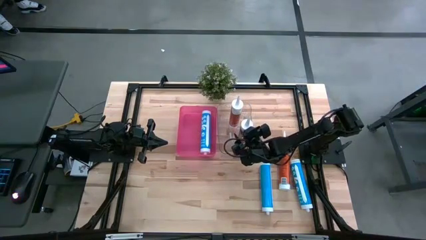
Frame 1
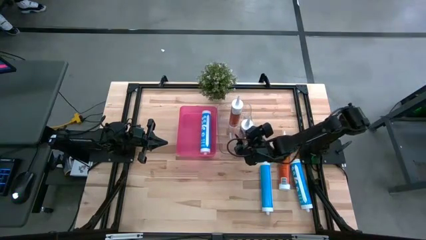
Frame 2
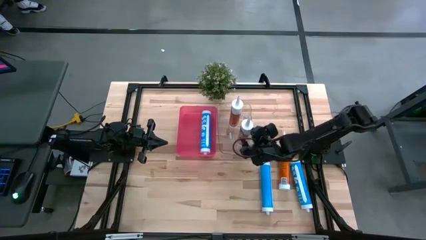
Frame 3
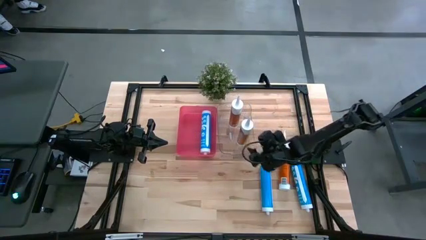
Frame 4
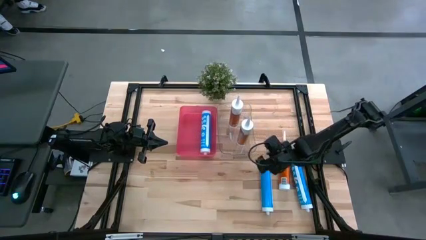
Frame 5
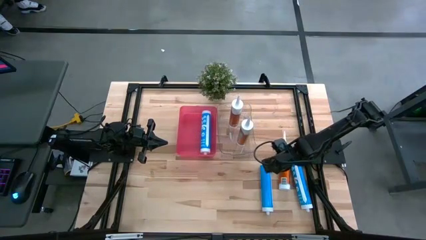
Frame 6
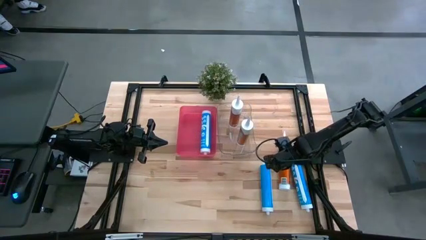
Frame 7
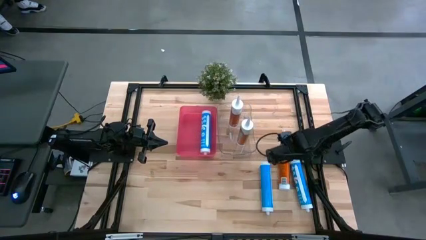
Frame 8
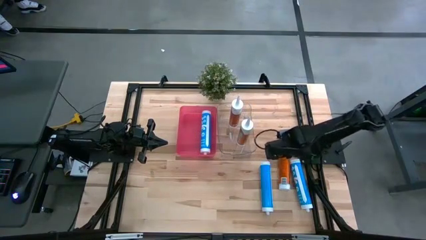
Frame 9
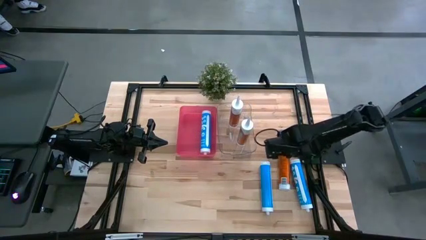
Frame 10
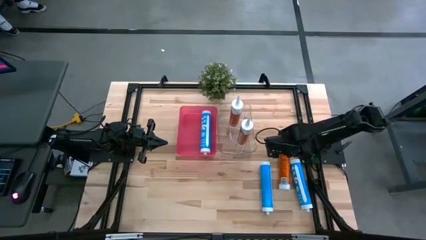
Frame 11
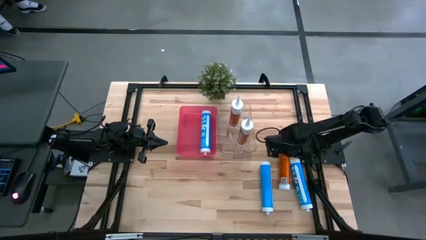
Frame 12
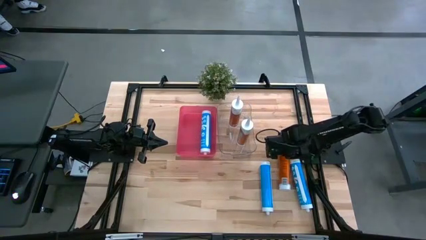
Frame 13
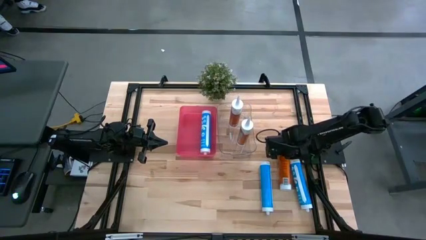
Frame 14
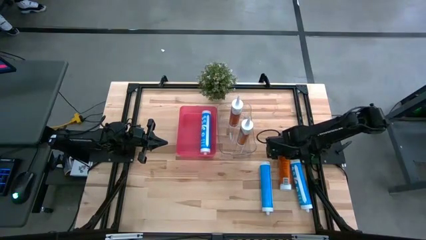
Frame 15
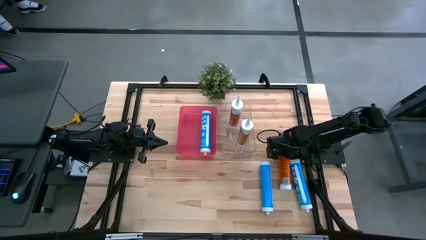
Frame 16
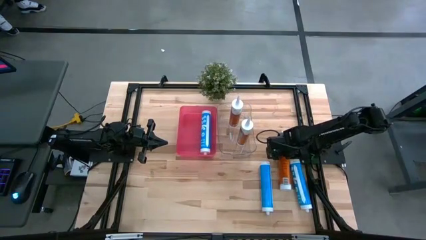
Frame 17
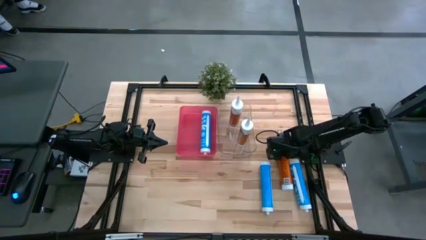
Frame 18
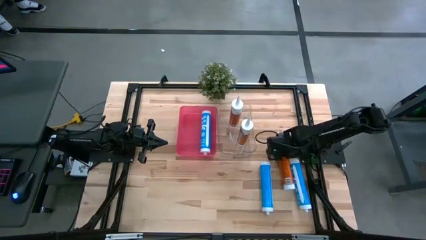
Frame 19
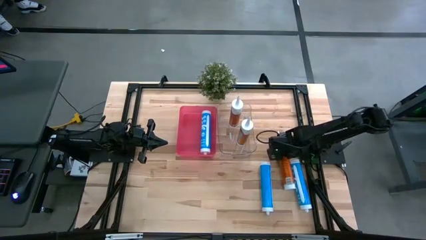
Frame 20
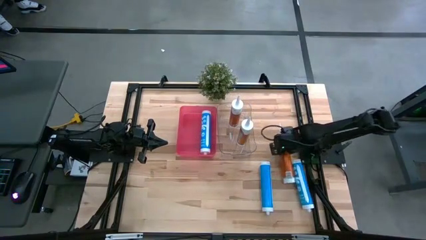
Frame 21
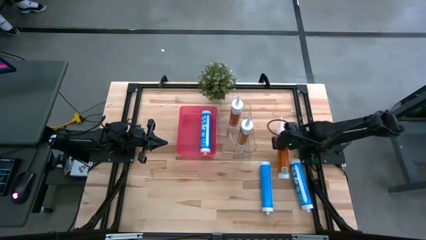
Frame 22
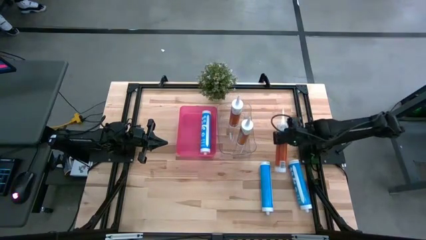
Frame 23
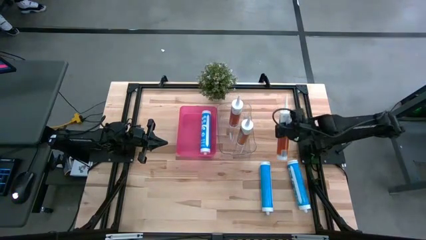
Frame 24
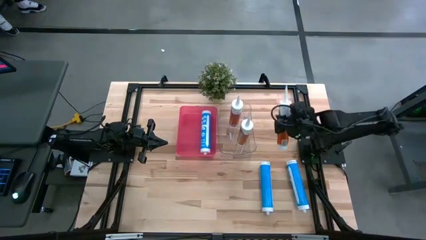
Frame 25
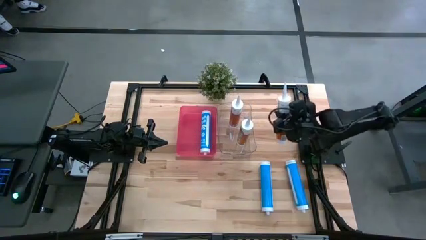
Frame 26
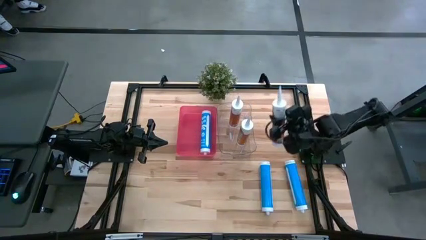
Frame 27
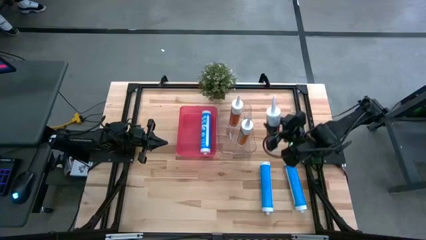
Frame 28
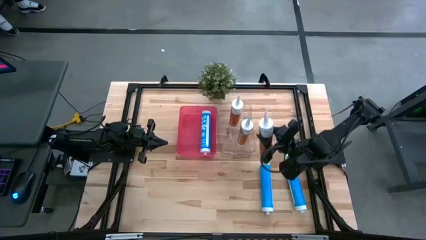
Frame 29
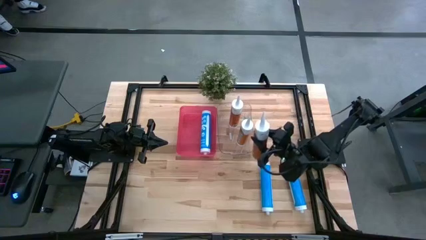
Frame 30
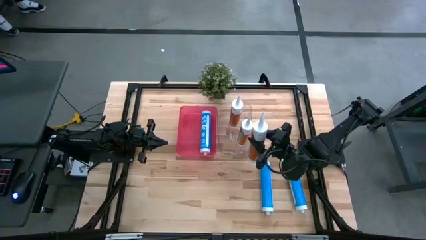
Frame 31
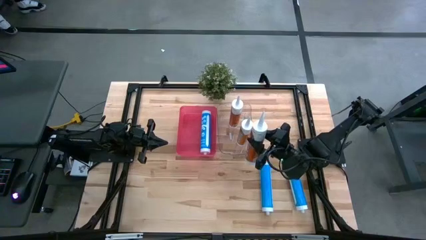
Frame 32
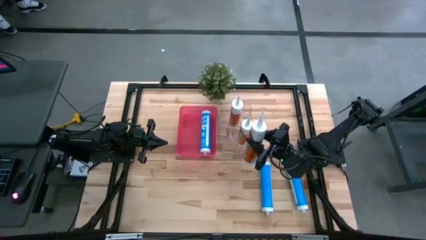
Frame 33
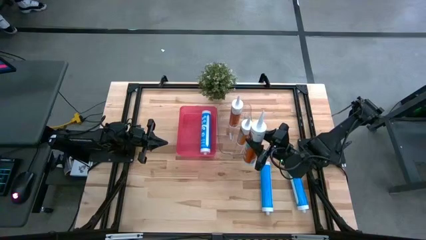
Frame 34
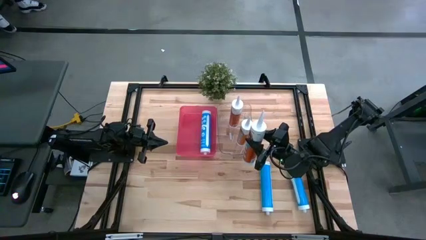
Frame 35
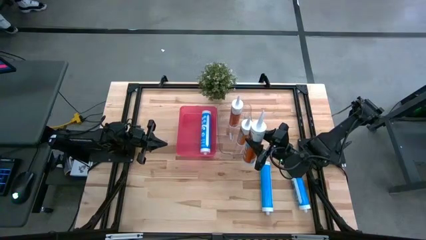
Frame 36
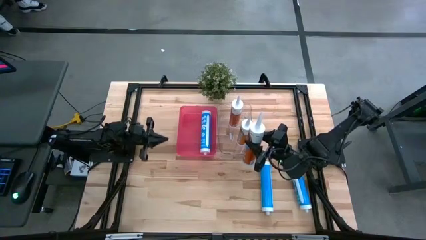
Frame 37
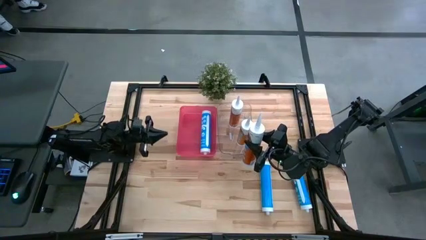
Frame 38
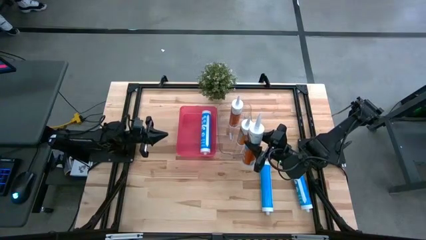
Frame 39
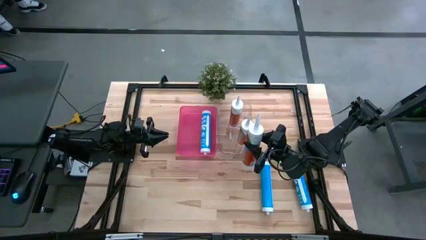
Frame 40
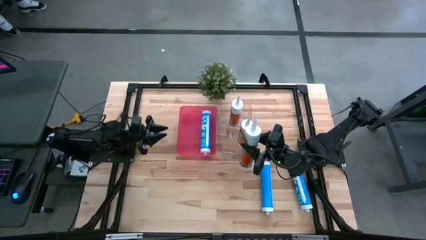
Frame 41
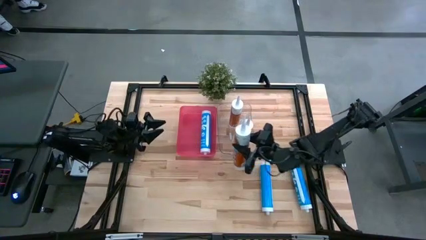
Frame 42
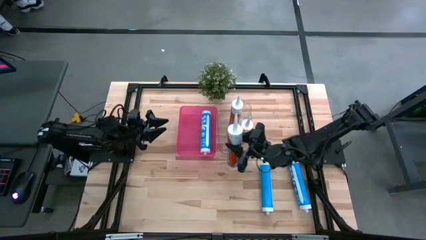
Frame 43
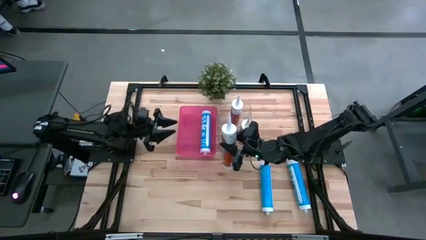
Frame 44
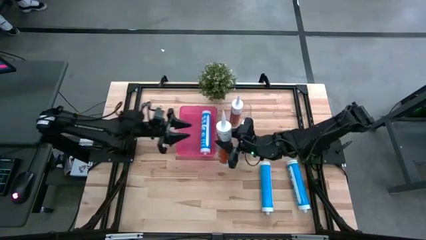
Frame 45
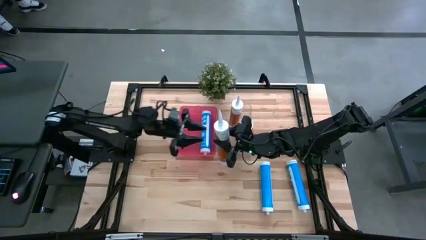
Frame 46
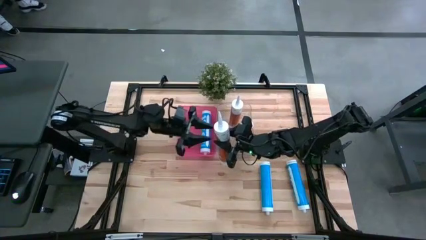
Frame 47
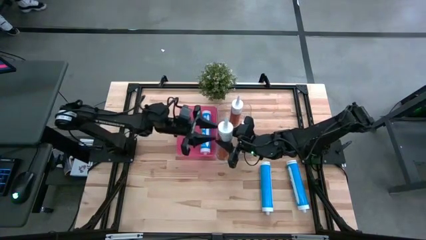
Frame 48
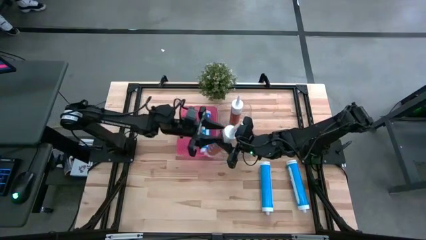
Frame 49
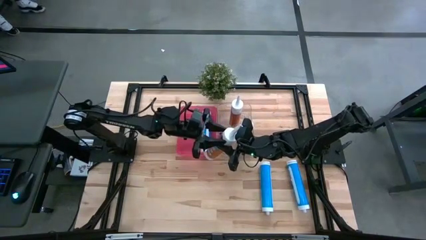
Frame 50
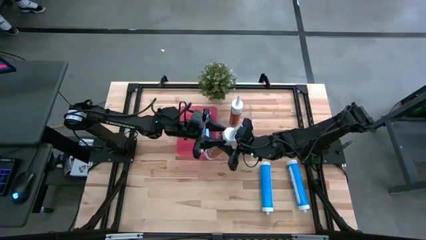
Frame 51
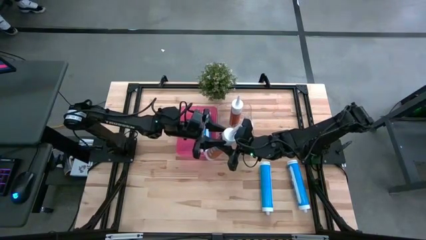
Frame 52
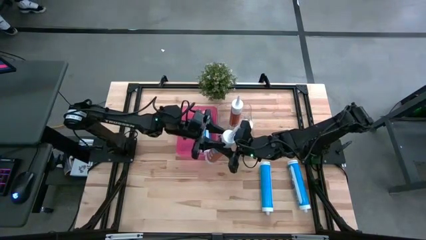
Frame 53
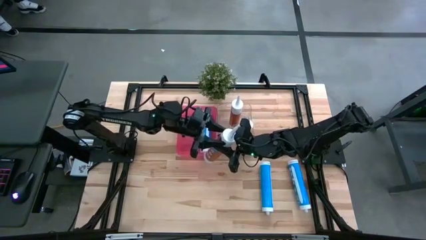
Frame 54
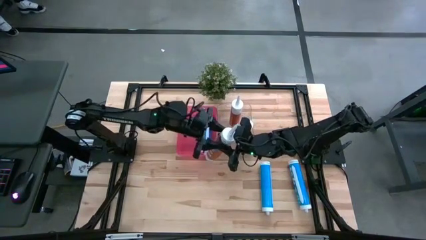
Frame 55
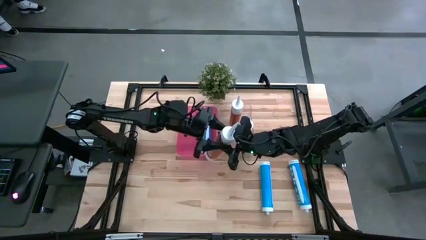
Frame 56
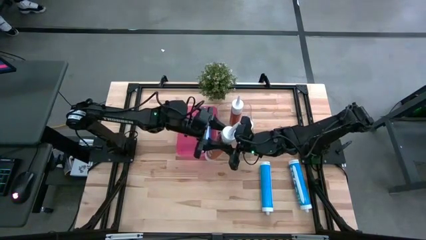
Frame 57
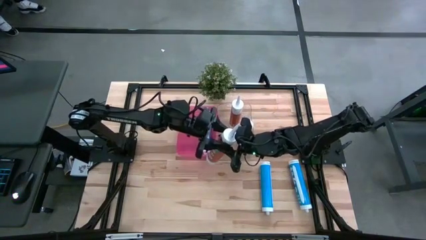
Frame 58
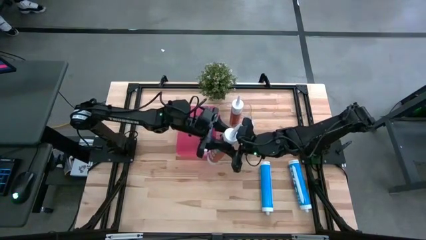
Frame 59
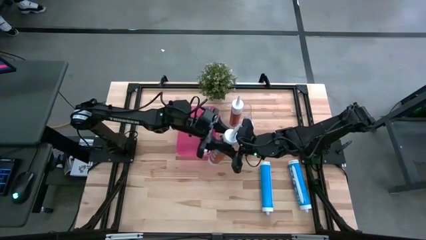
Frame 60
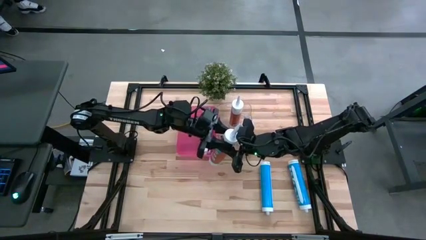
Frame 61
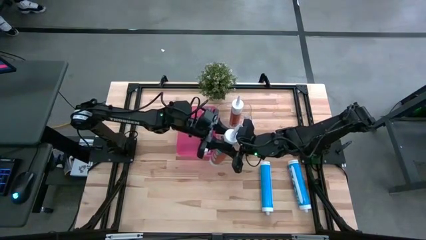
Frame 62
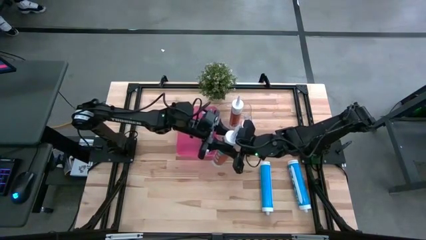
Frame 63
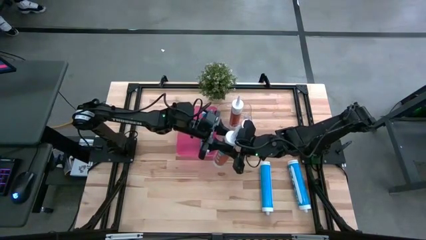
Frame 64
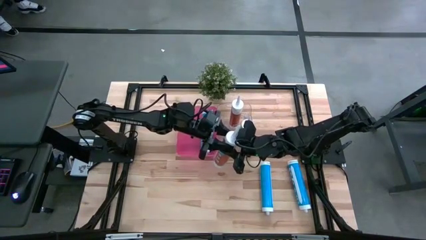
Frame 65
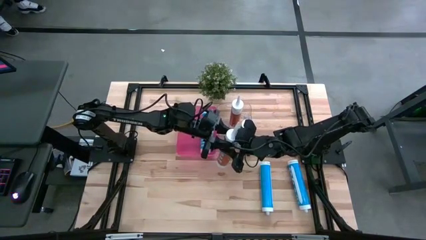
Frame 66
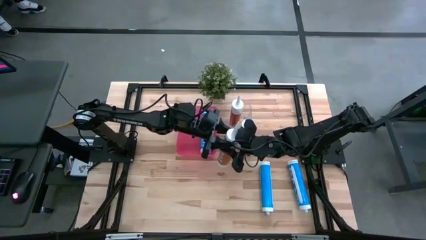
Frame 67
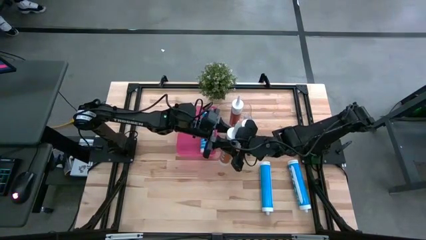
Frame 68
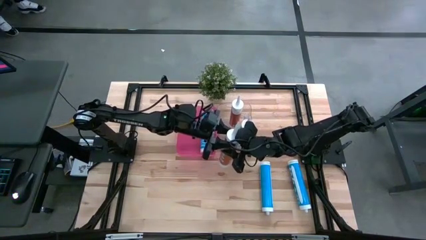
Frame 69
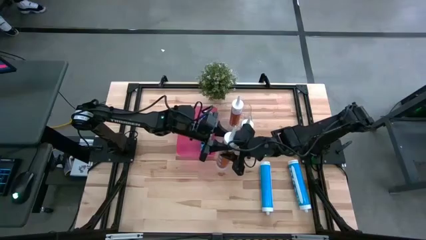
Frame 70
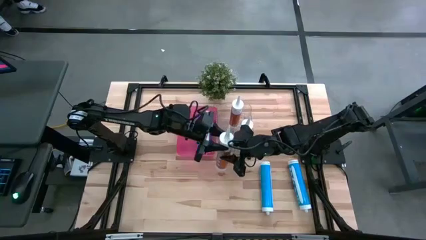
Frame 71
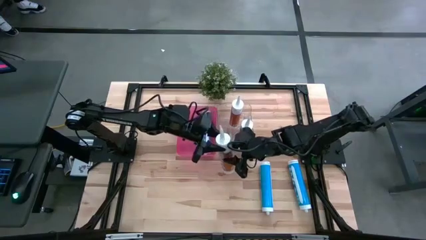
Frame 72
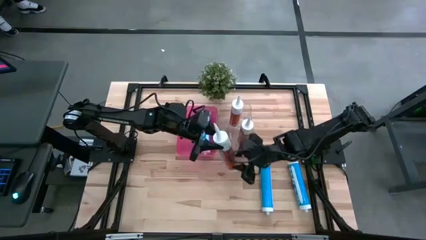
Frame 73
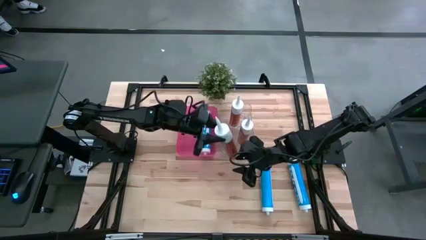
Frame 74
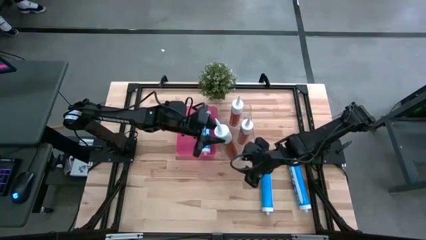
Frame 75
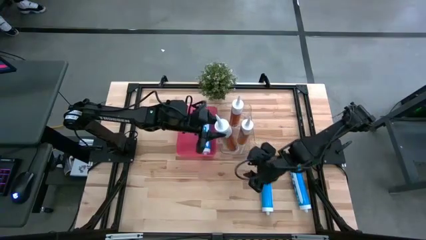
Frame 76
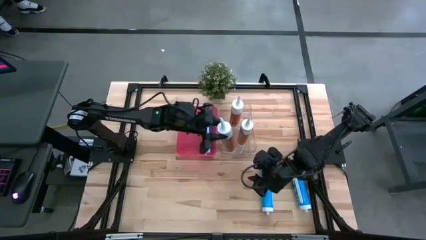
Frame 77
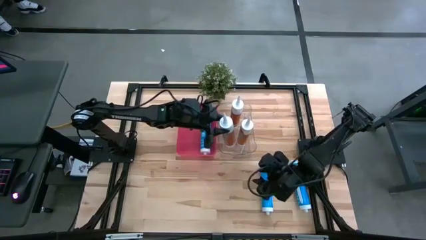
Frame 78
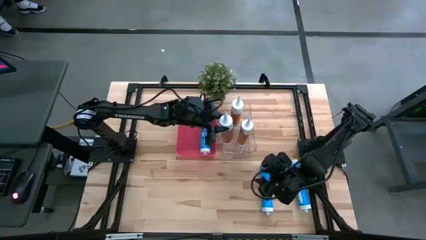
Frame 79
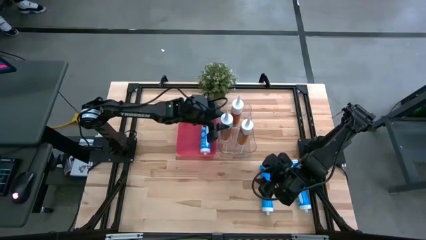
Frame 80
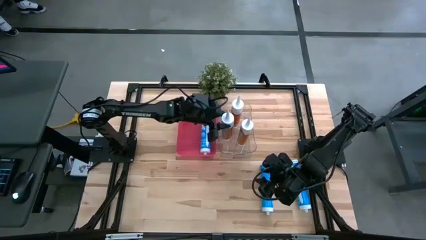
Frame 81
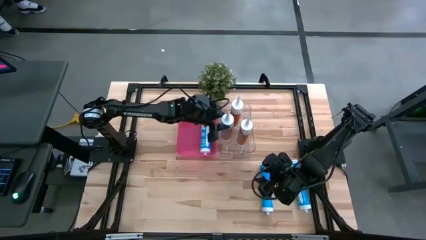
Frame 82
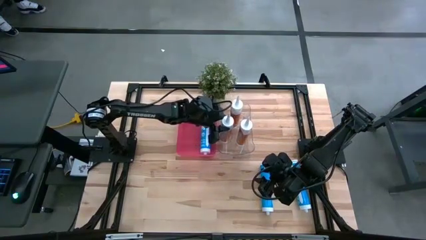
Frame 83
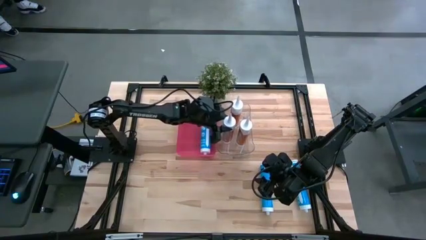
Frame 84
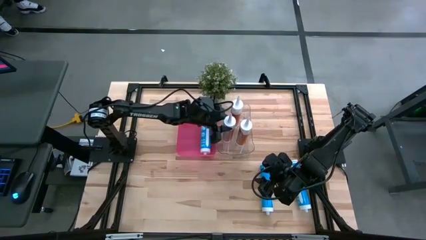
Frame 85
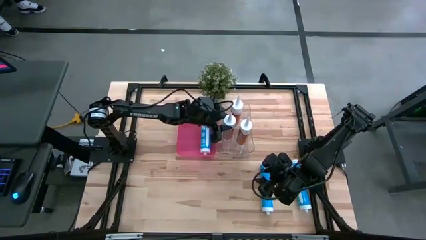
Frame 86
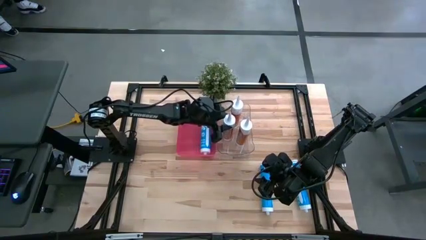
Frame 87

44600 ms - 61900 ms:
Task: Pick & place silicon tubes, Sealant and Lysol wipes
Put the orange sealant into the transparent bin
